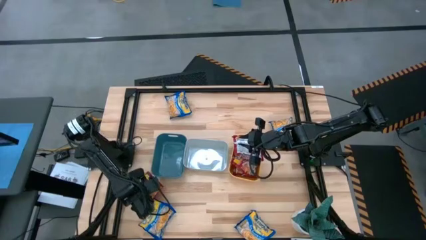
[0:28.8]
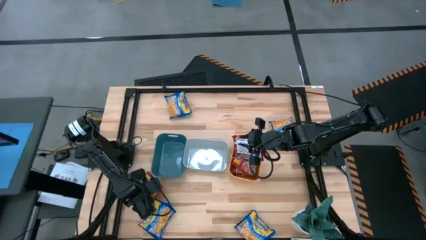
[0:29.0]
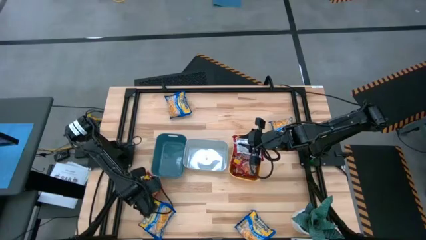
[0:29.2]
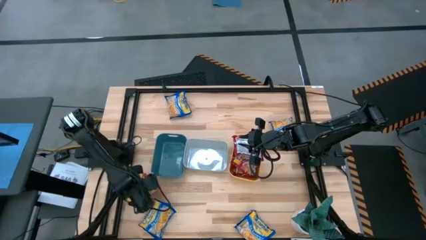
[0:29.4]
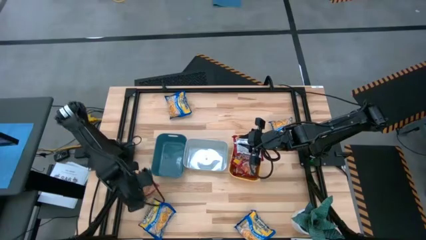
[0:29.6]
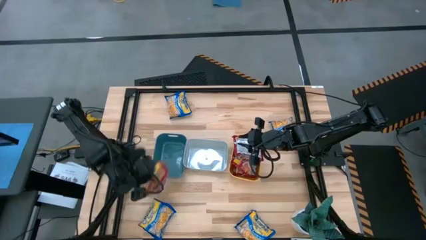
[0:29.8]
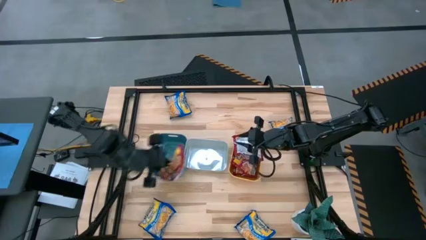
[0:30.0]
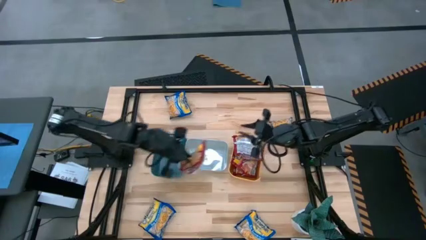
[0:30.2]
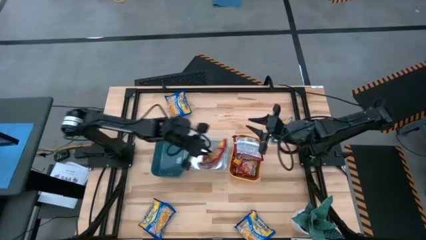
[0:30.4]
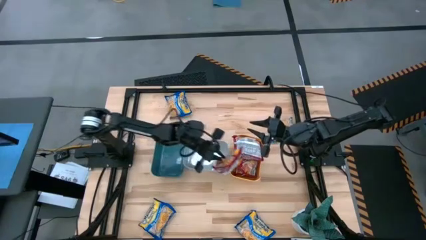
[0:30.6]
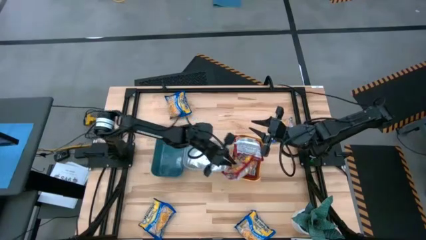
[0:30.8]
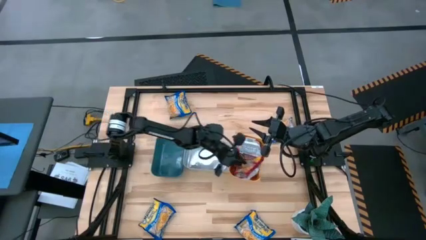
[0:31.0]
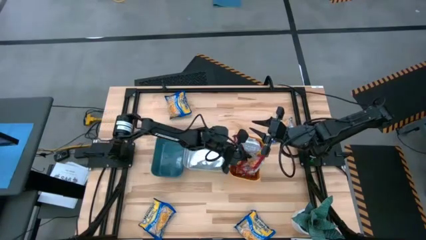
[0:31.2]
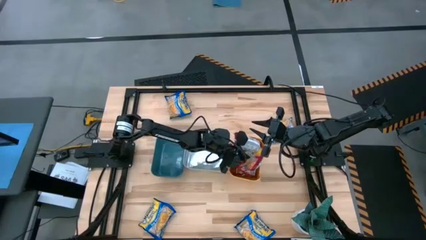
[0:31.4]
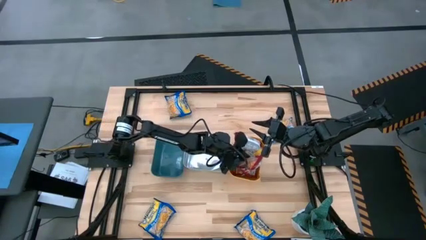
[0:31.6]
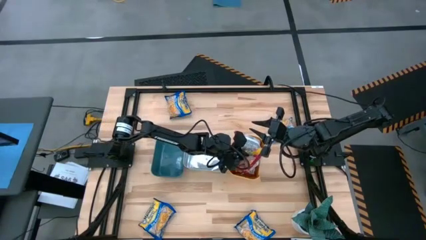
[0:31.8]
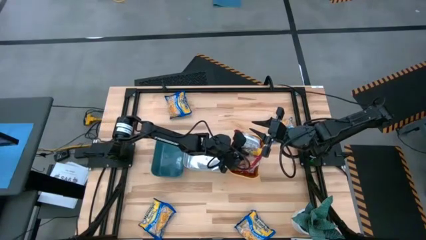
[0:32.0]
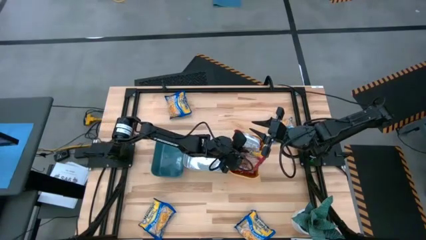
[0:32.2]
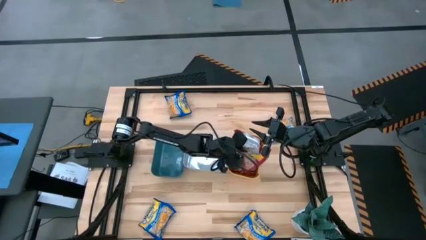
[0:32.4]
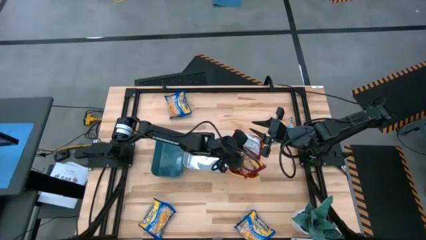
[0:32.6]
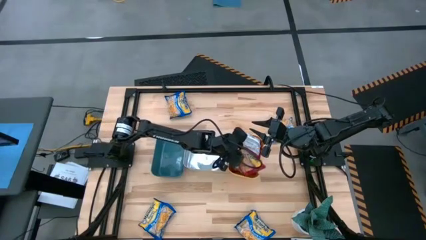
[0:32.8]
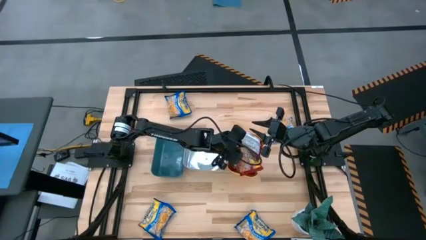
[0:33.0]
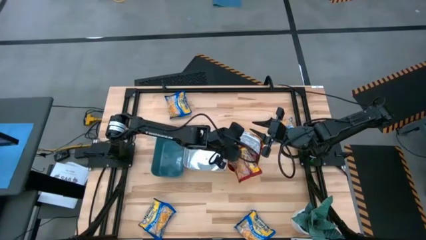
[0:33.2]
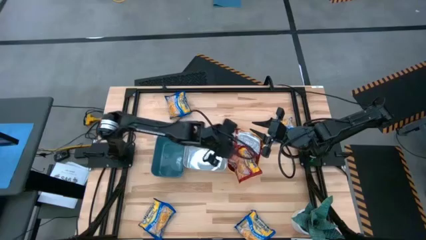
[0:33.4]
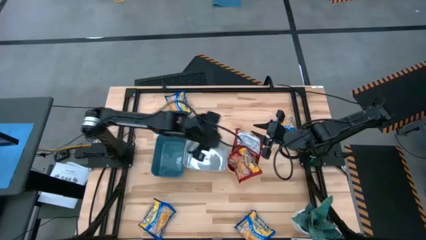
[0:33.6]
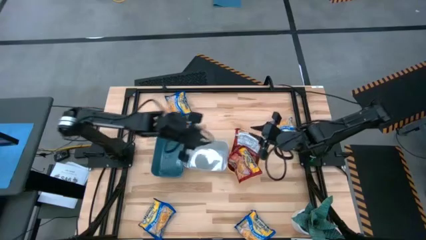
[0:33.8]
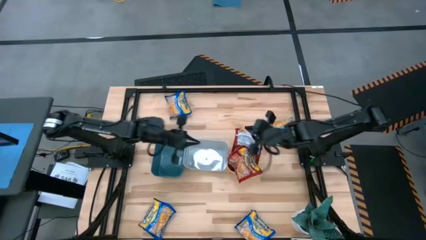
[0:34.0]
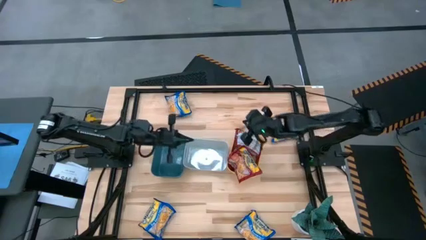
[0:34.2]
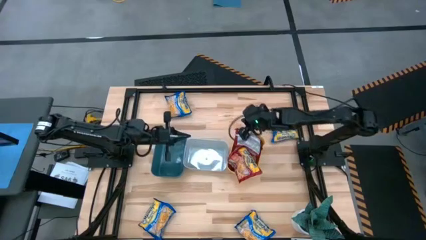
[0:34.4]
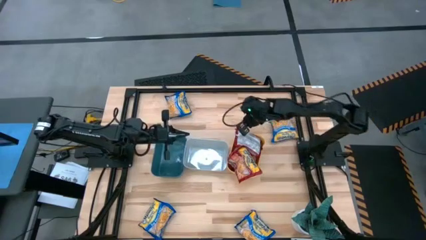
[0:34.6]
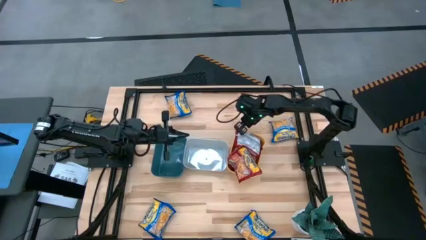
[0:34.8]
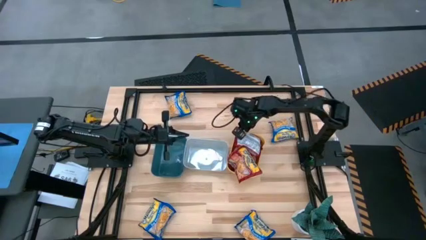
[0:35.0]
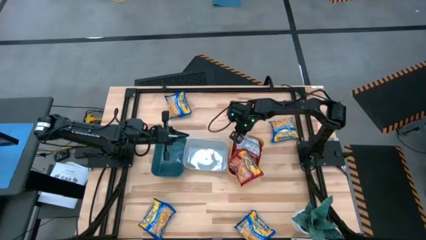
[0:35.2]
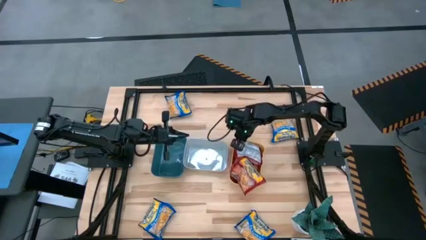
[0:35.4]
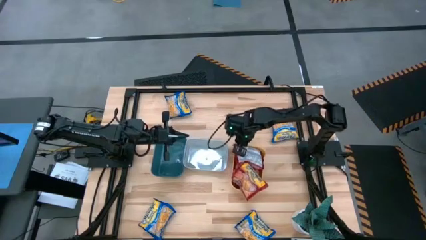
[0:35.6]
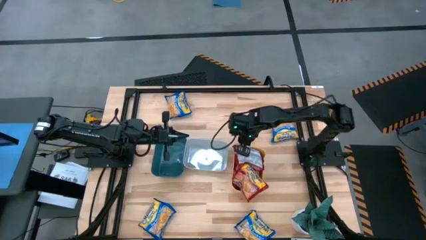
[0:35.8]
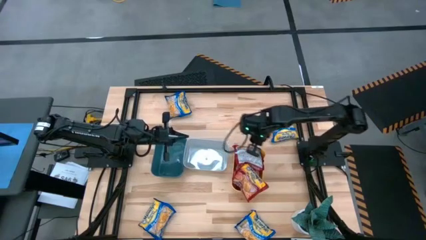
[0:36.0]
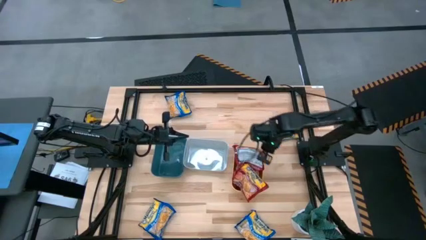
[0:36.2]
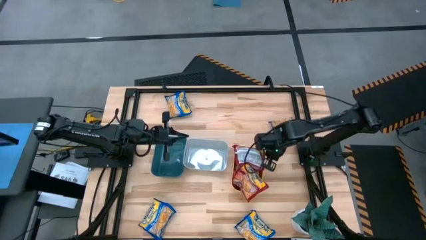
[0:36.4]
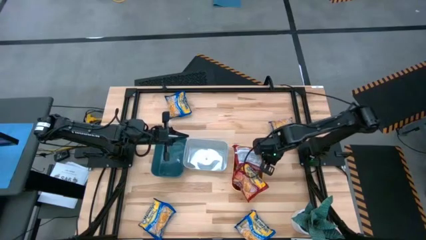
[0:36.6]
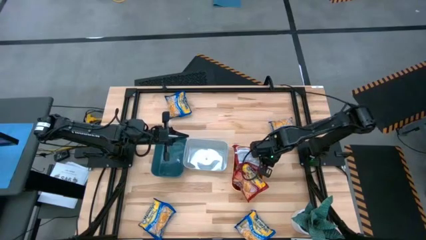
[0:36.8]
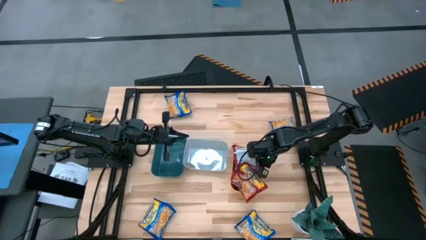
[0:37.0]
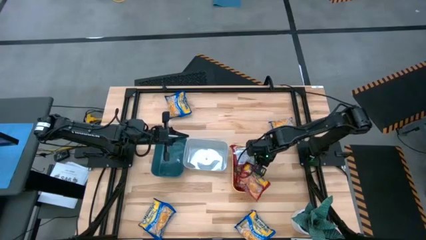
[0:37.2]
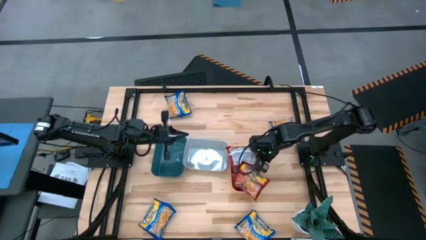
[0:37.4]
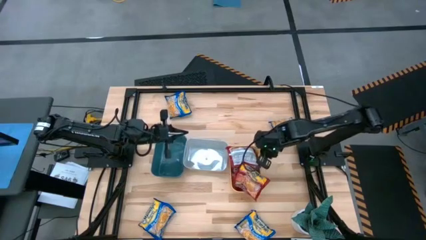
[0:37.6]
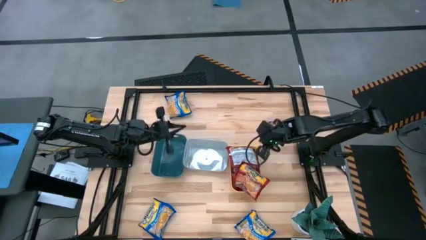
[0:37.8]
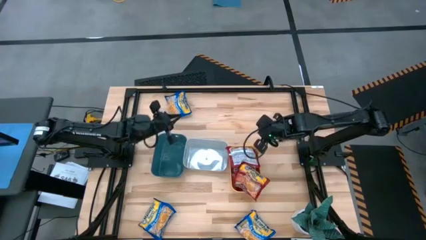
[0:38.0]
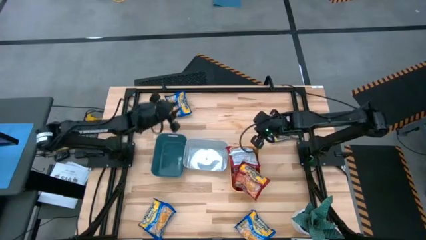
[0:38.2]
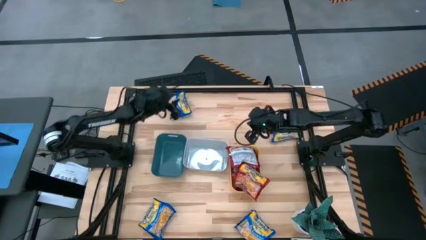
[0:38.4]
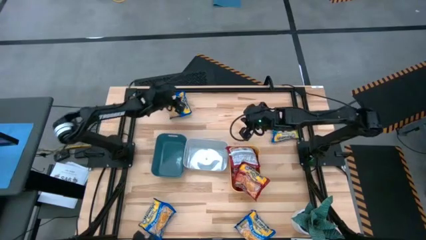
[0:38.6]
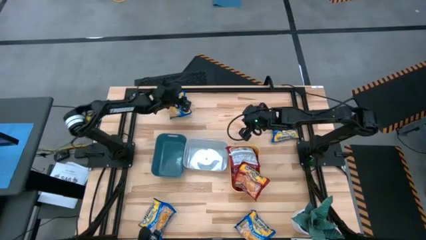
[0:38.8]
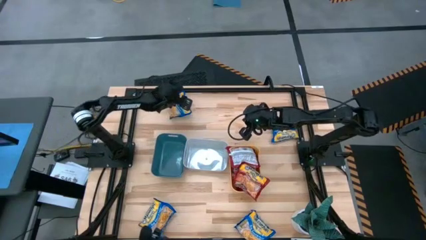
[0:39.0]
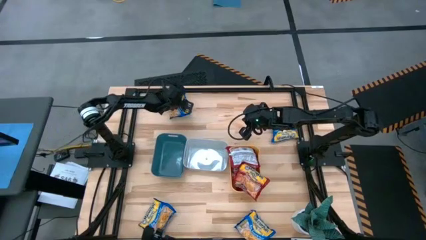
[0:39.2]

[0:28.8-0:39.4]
Task: Sort Maruchan noodles
Put the red noodle pack into the yellow bin

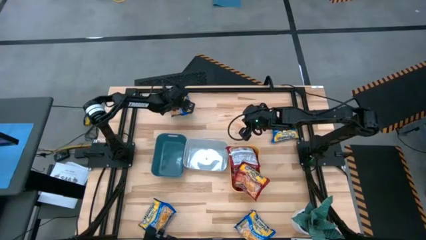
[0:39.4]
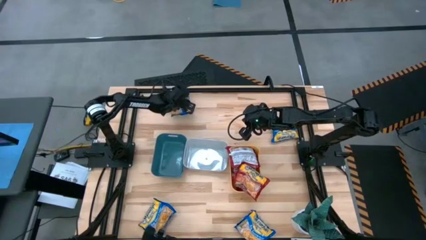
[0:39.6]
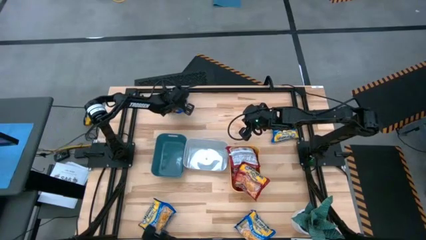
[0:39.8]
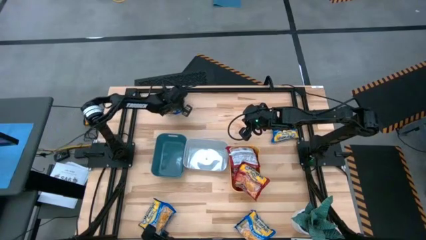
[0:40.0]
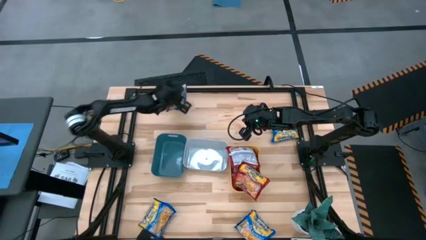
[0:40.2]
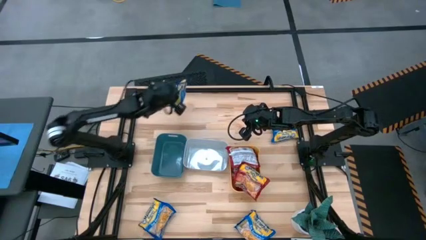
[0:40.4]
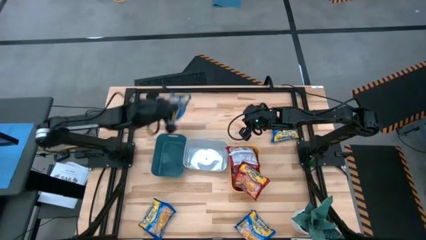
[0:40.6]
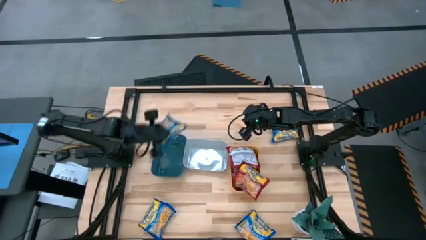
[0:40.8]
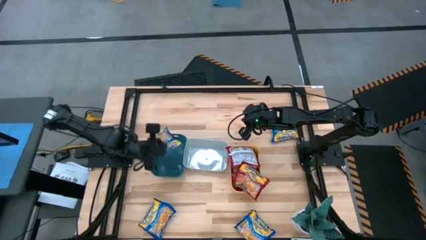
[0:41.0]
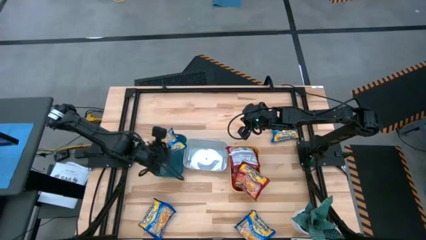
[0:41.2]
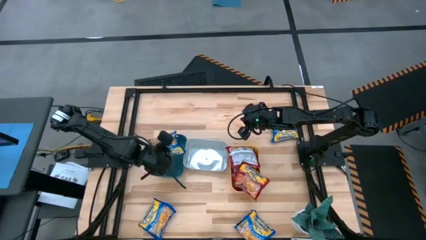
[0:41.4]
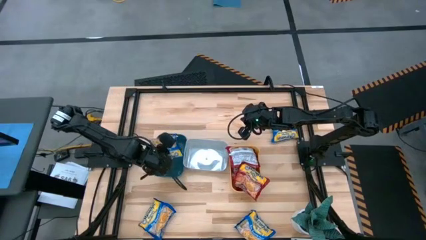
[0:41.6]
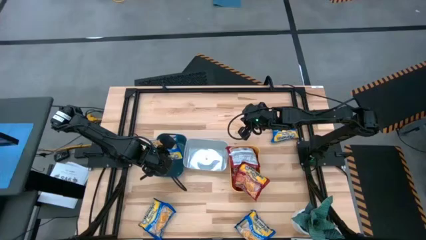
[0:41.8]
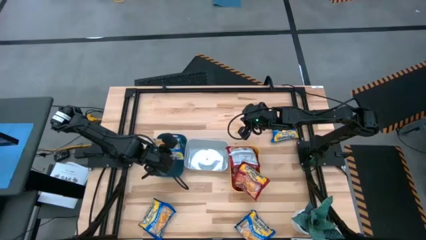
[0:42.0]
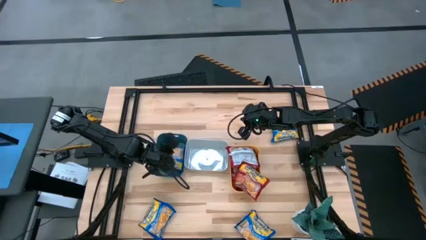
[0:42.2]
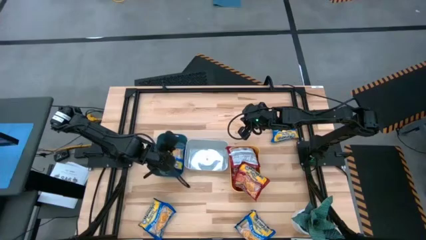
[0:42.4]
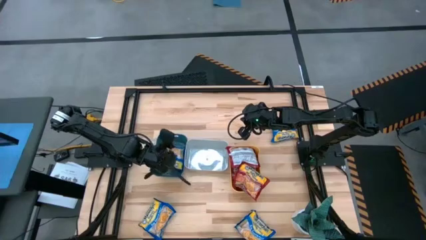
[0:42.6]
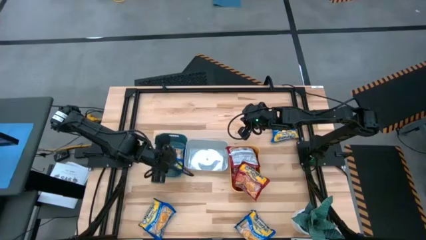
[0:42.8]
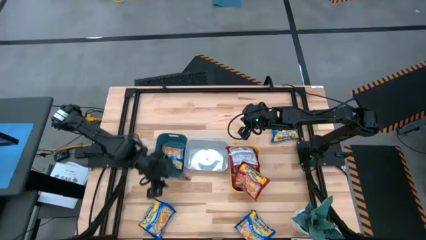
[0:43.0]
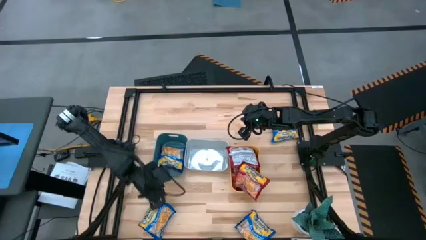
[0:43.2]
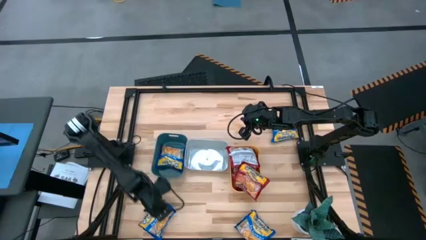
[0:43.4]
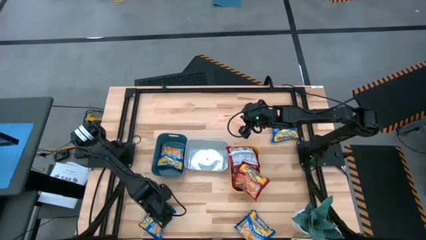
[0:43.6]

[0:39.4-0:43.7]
Put the top left blue noodle pack into the green bin
